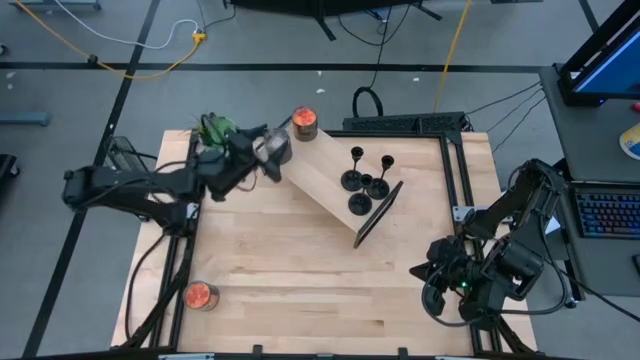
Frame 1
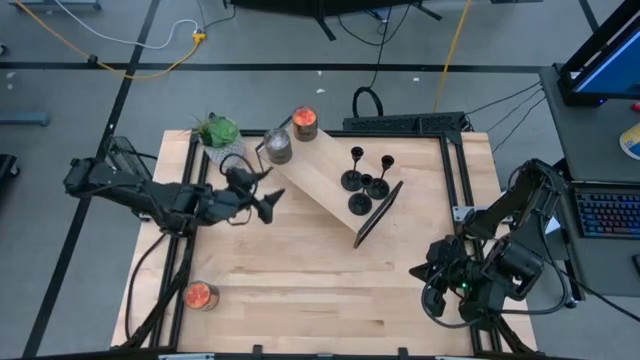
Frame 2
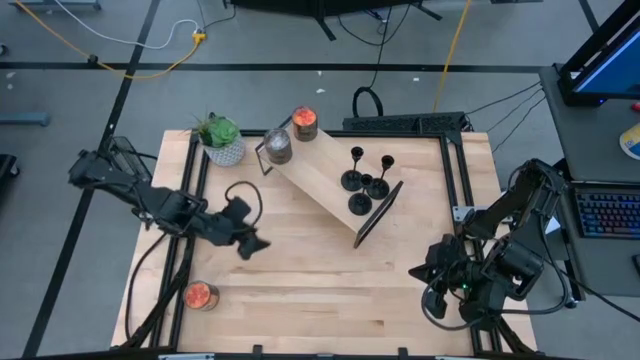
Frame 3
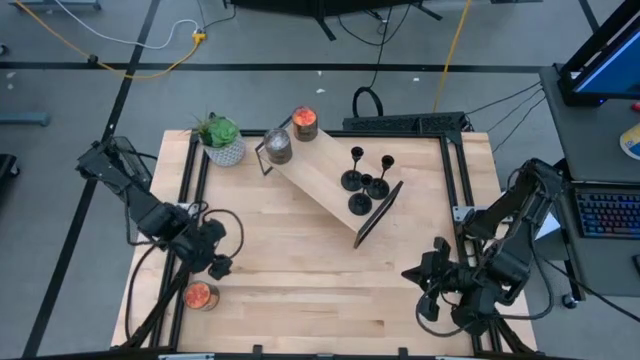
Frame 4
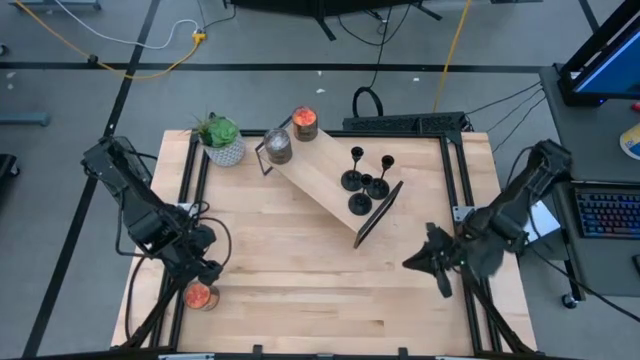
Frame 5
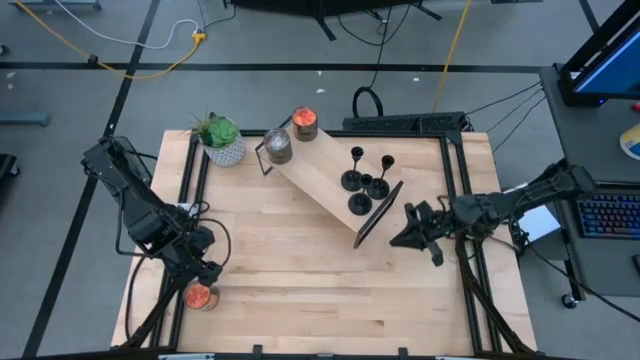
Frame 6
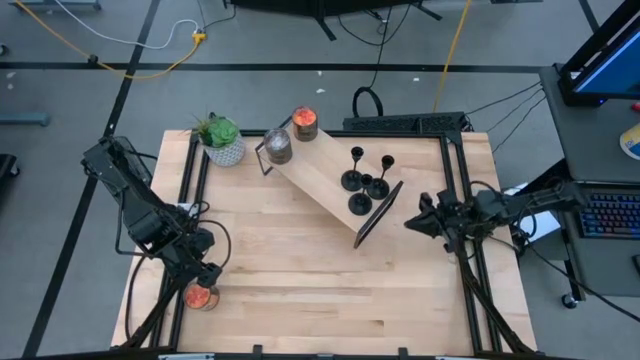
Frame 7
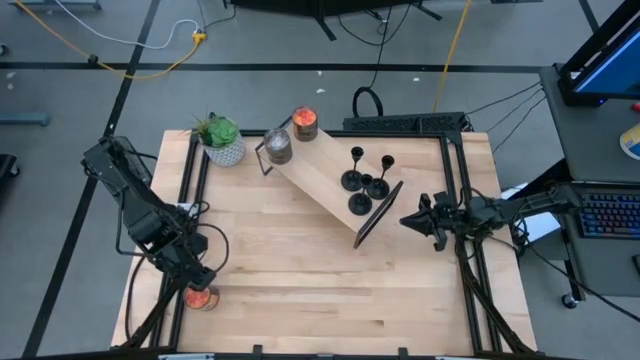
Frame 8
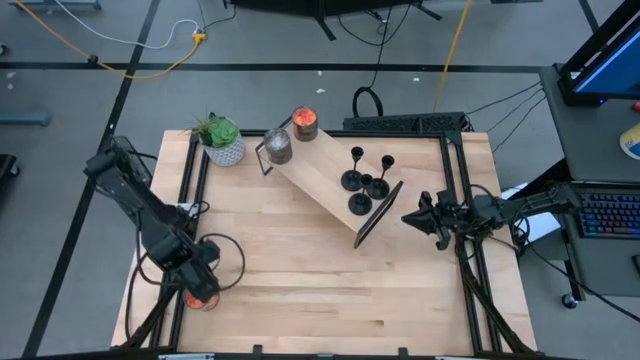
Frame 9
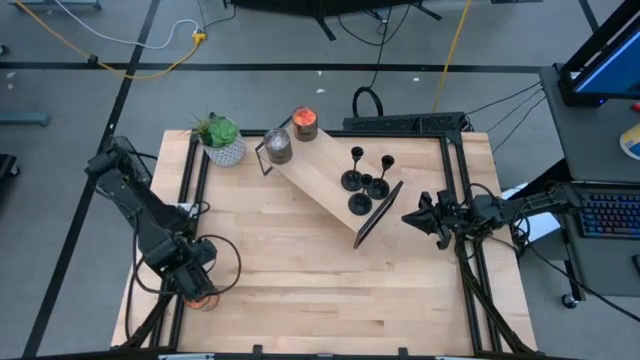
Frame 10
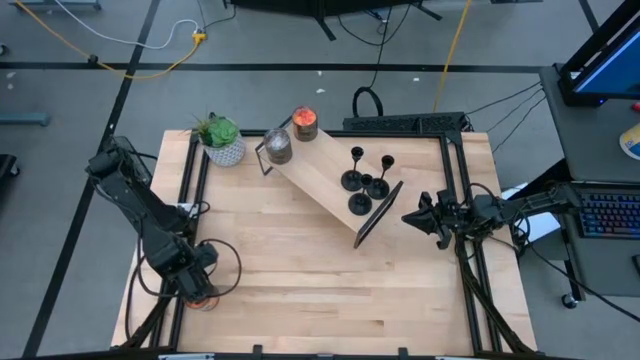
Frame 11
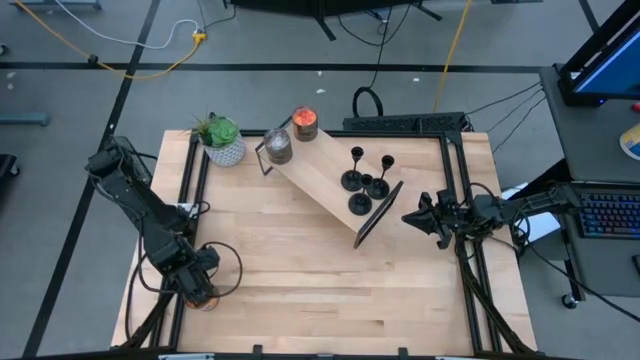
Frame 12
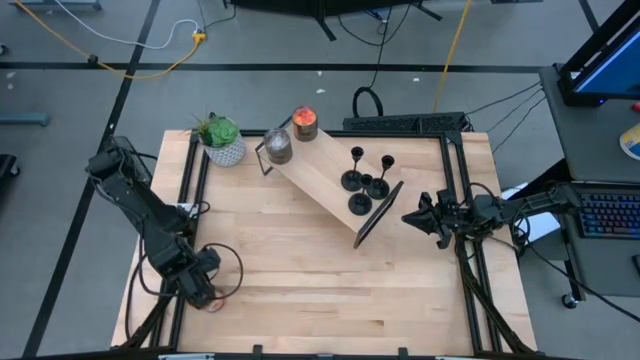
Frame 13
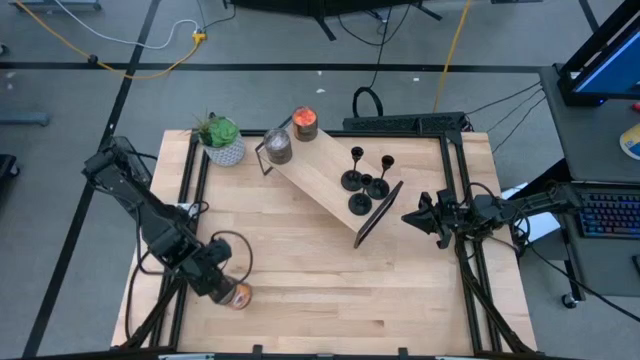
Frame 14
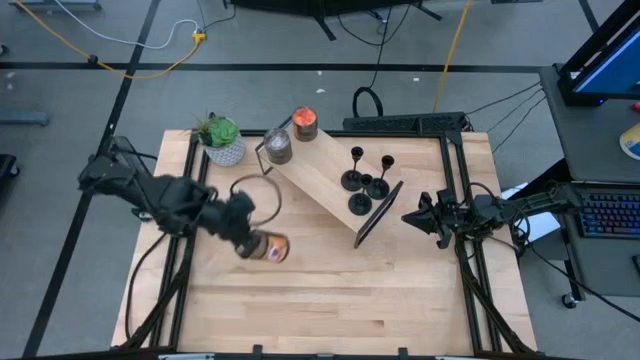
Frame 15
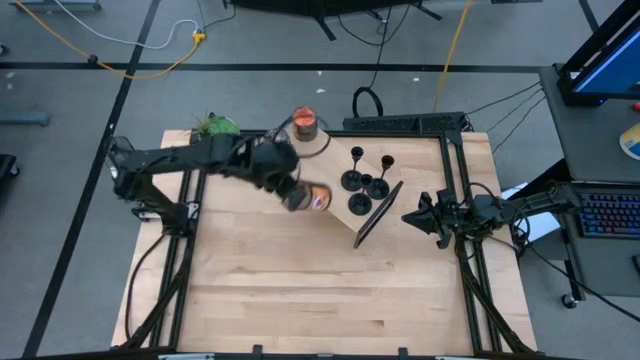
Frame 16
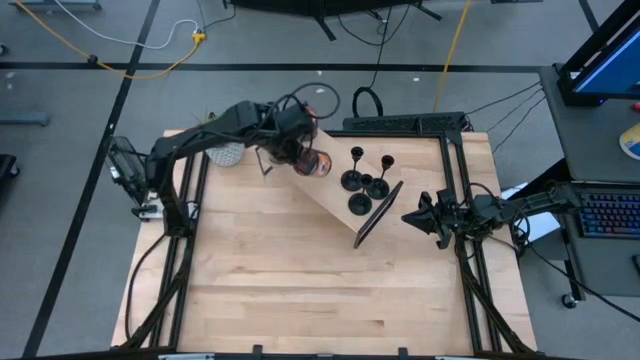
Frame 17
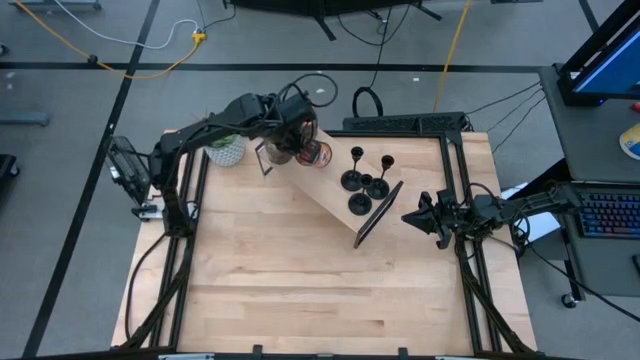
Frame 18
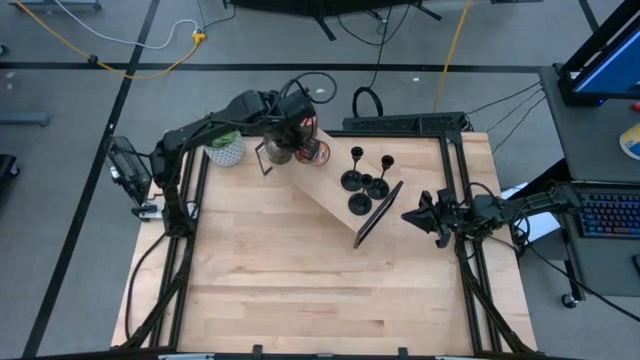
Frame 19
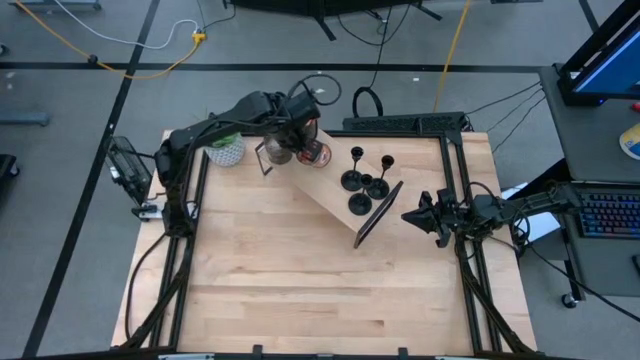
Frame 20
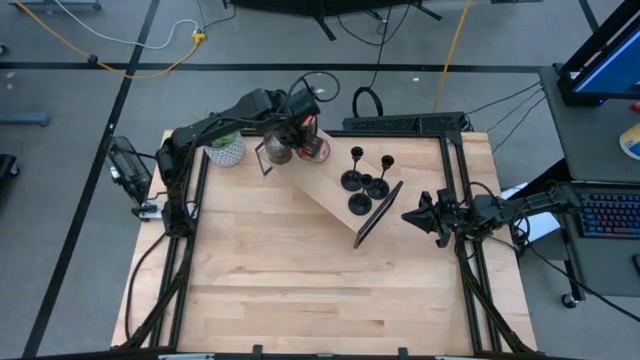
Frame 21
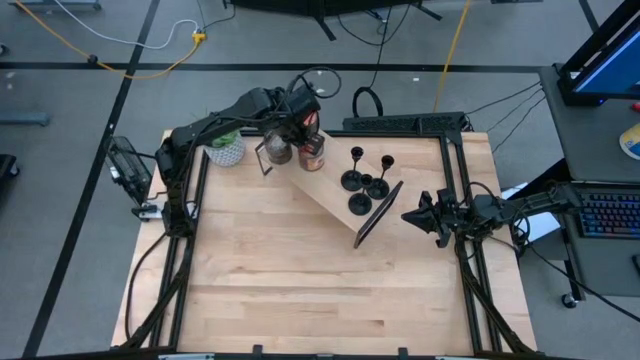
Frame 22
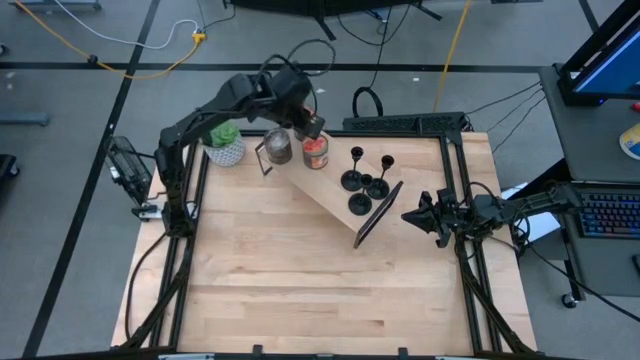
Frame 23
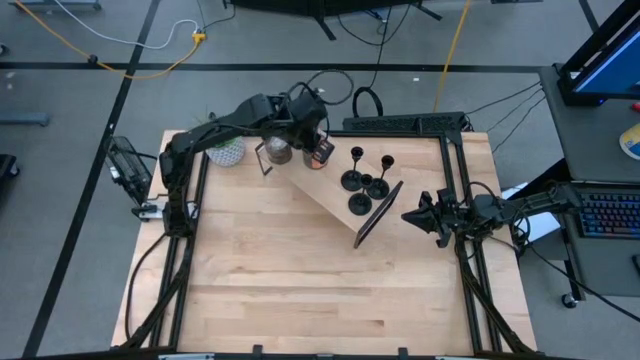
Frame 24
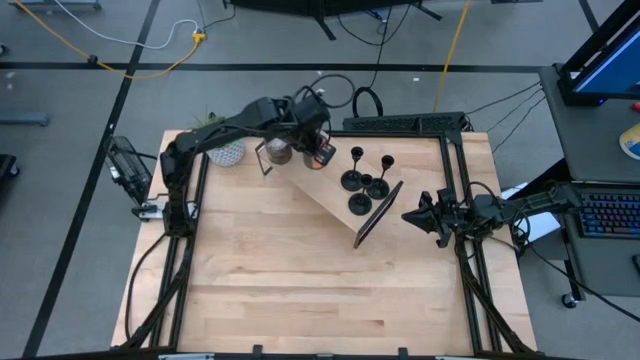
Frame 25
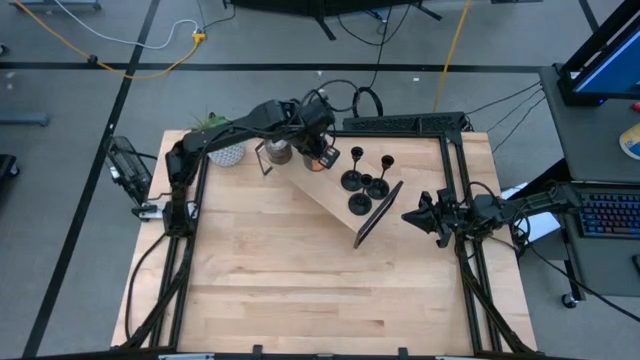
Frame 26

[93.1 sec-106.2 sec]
Task: Pick & Place candle stick holders
Put the orange scented candle on the shelf

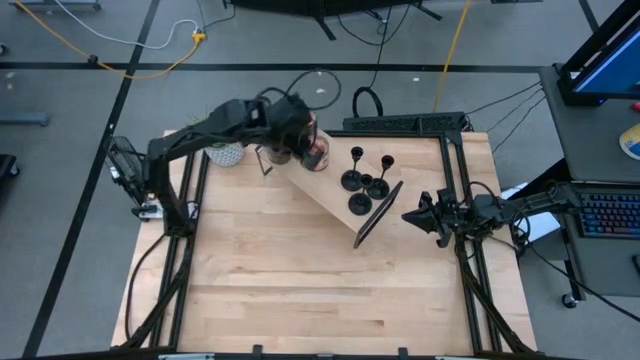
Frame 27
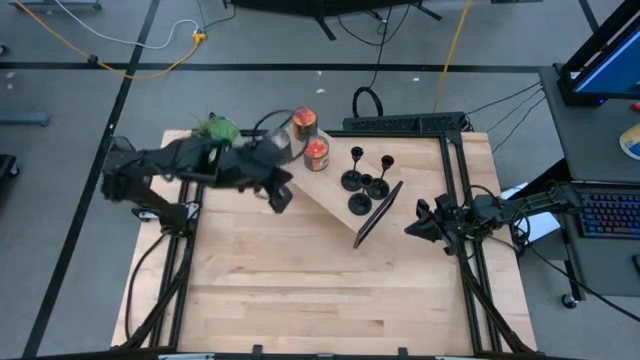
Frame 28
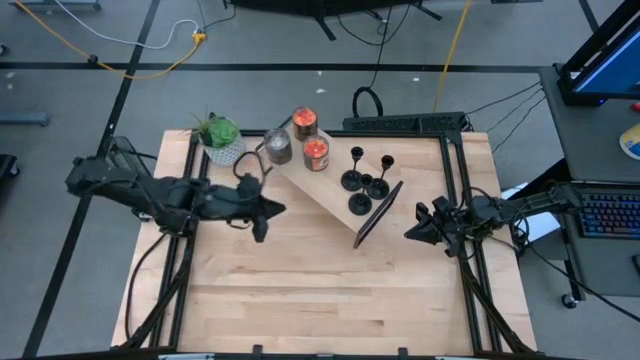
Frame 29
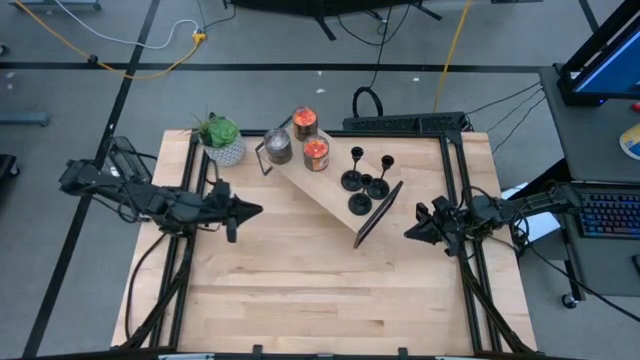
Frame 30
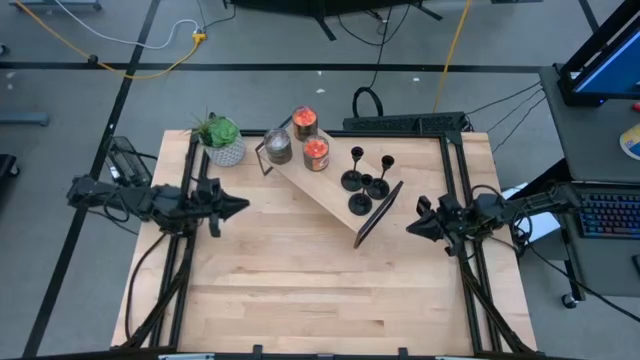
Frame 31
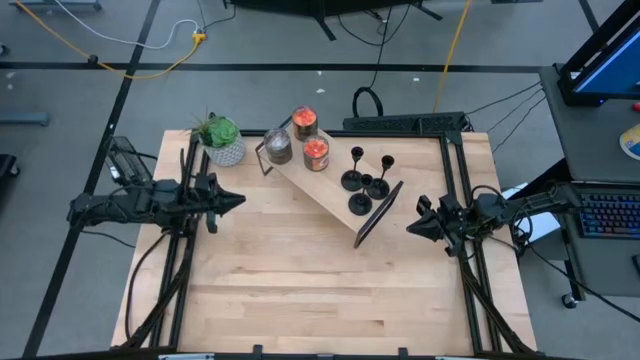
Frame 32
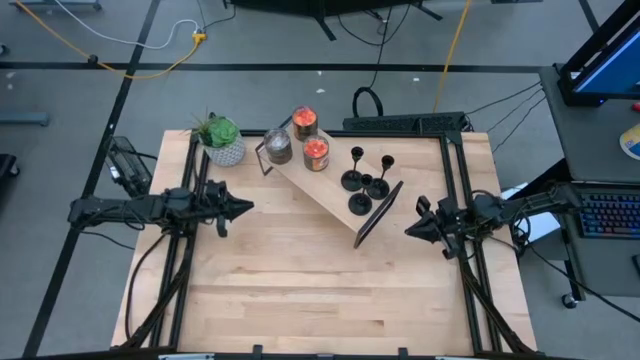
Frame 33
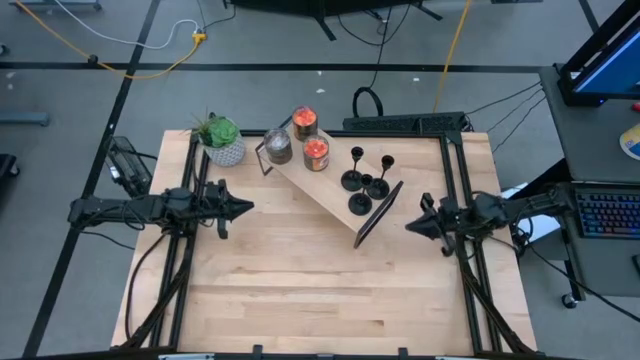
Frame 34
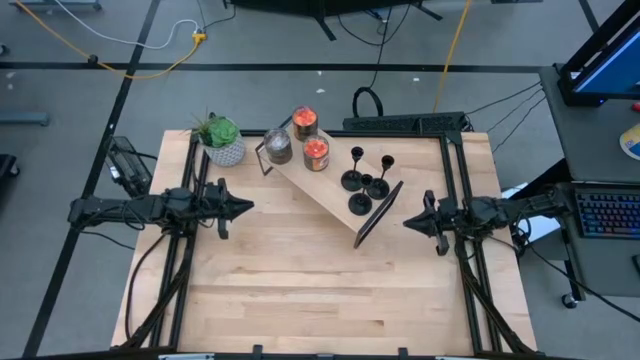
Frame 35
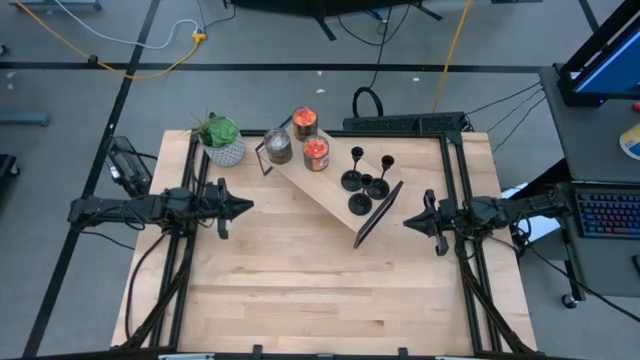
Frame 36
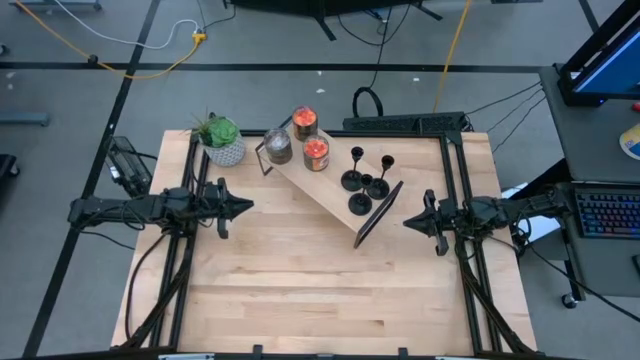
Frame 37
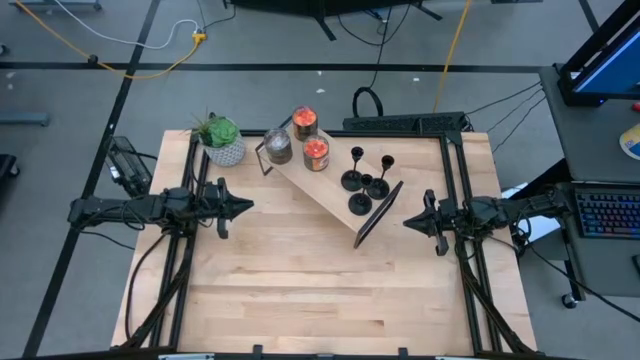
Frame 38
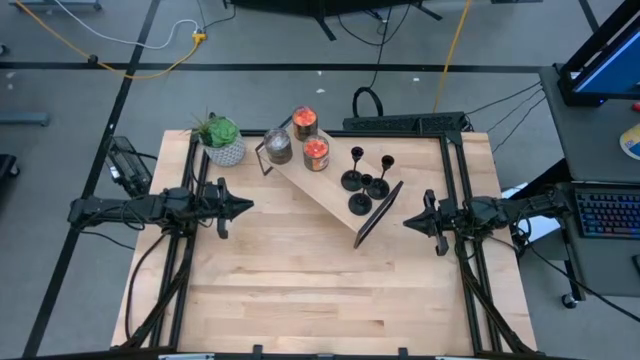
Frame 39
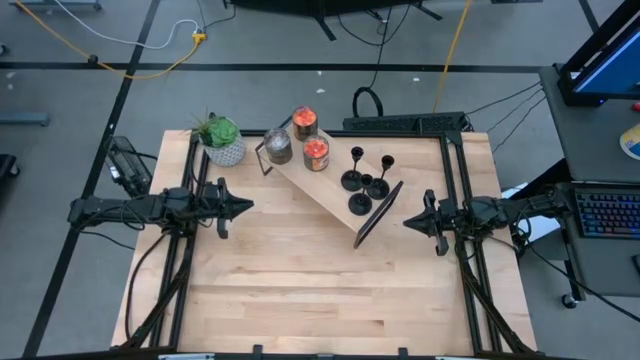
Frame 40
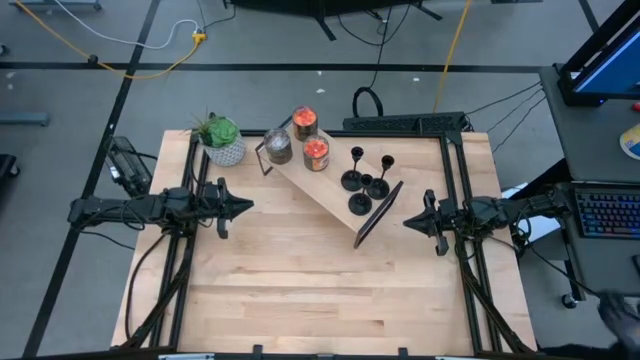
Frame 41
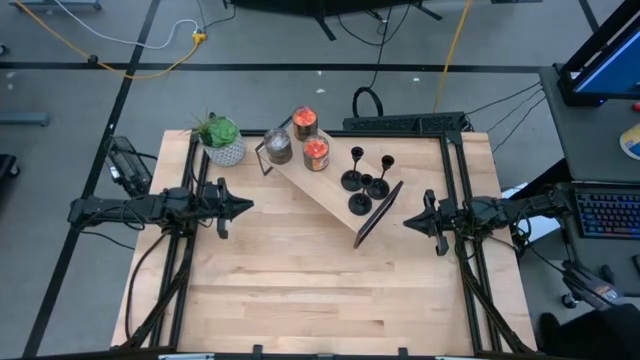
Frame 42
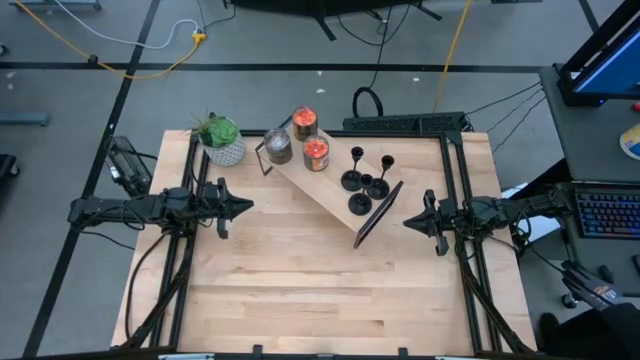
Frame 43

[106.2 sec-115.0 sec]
Return to Home Position
